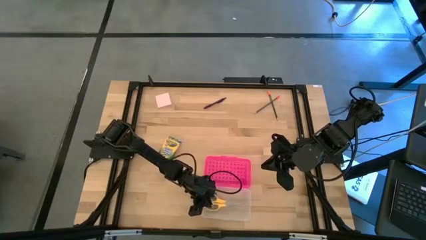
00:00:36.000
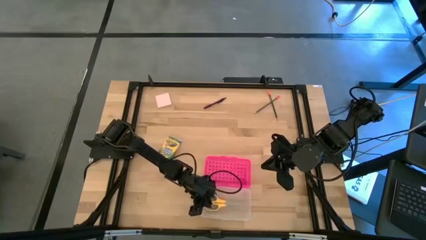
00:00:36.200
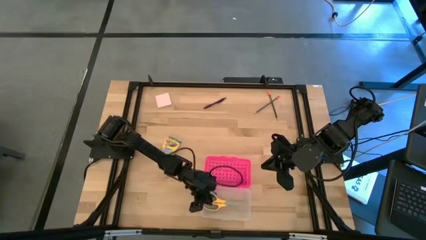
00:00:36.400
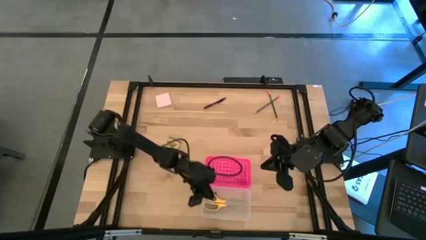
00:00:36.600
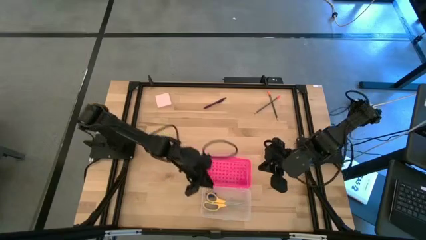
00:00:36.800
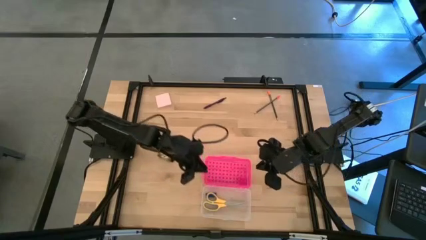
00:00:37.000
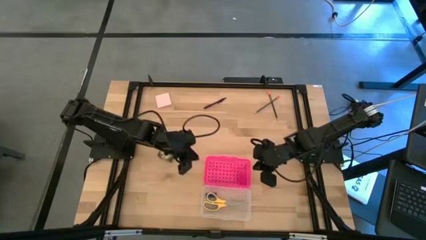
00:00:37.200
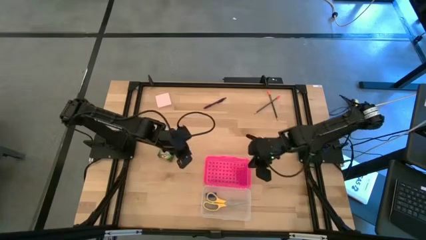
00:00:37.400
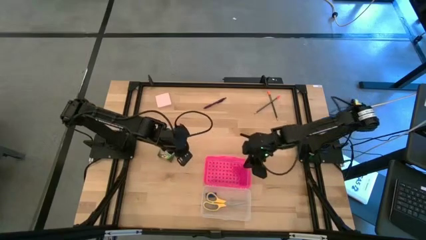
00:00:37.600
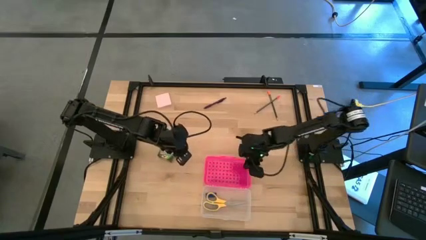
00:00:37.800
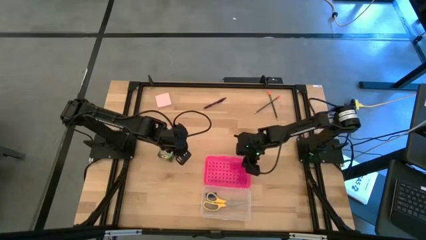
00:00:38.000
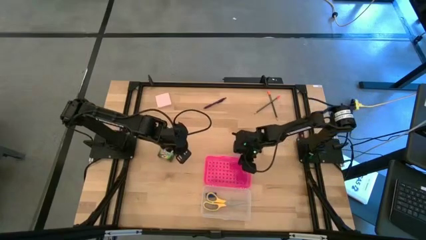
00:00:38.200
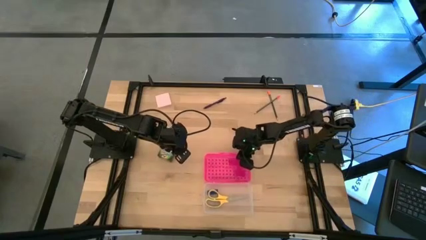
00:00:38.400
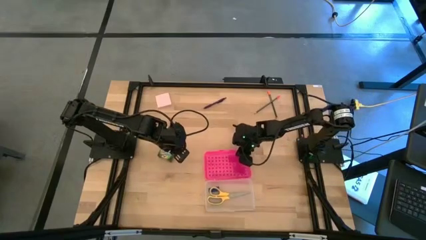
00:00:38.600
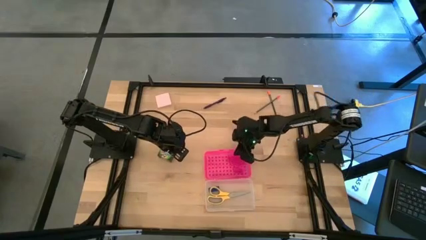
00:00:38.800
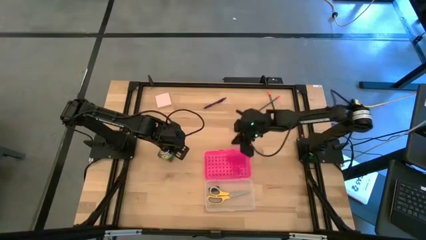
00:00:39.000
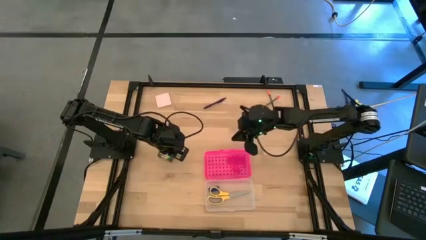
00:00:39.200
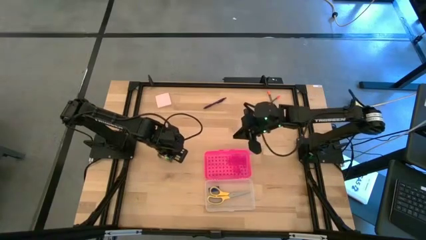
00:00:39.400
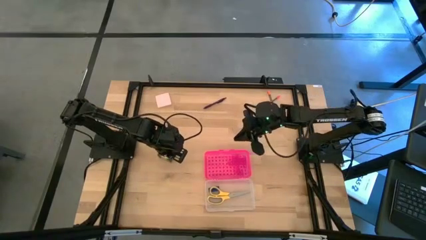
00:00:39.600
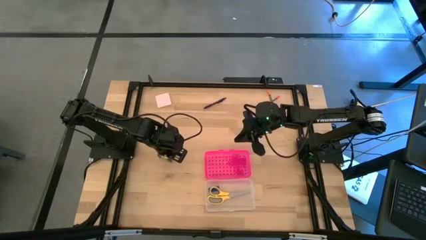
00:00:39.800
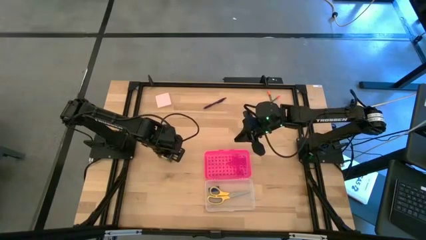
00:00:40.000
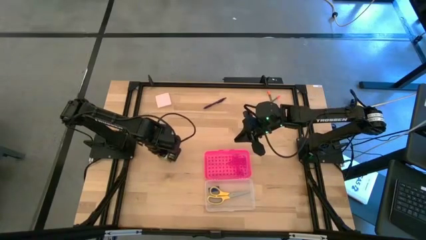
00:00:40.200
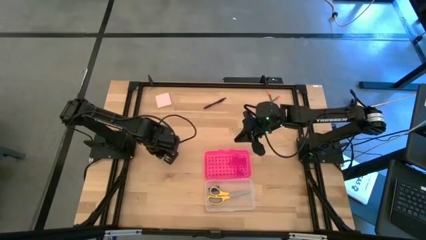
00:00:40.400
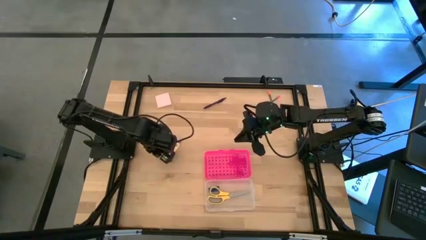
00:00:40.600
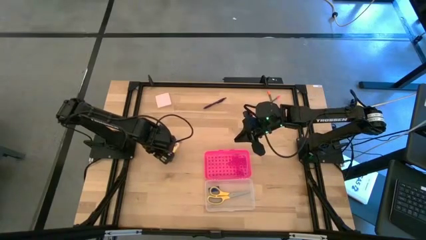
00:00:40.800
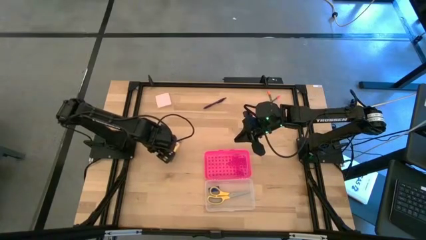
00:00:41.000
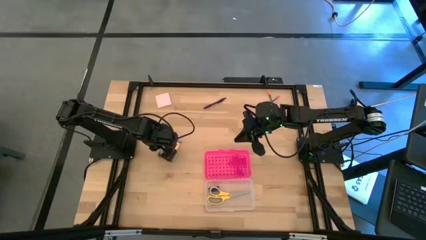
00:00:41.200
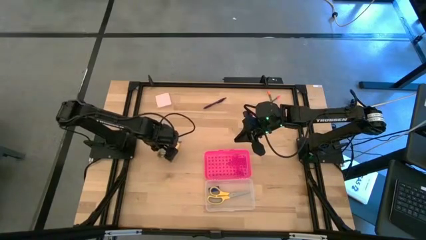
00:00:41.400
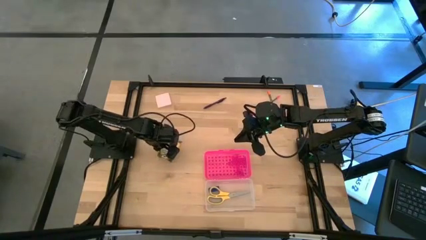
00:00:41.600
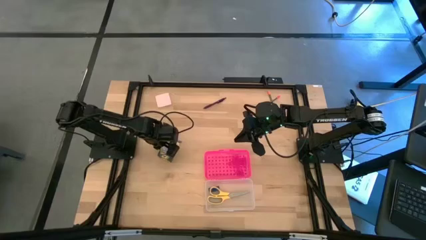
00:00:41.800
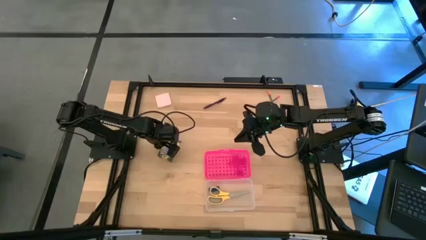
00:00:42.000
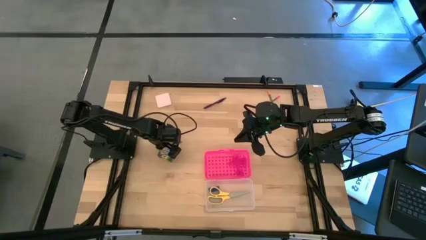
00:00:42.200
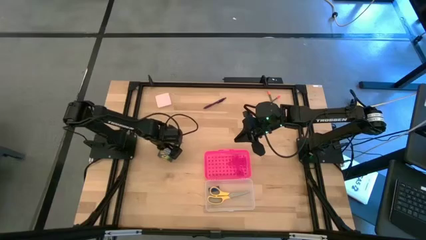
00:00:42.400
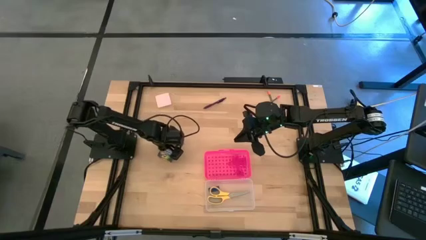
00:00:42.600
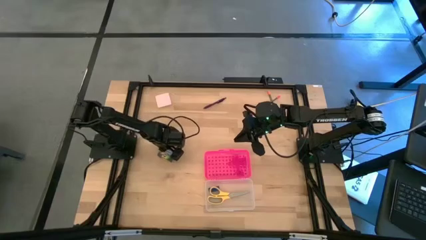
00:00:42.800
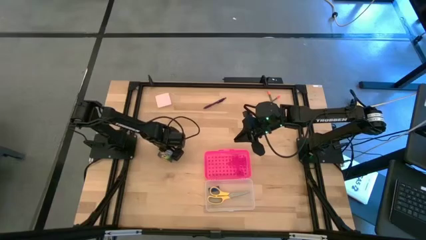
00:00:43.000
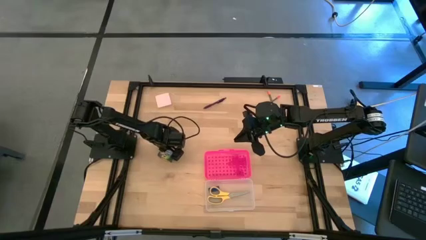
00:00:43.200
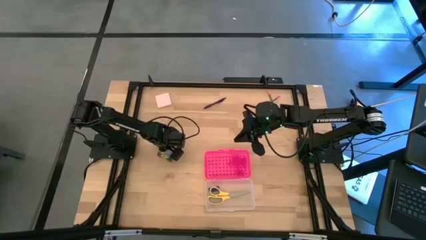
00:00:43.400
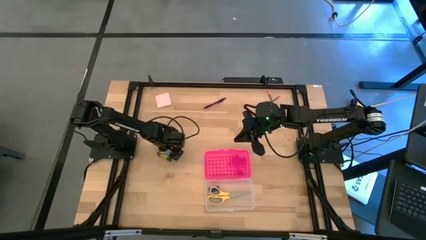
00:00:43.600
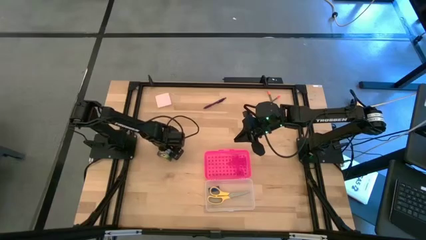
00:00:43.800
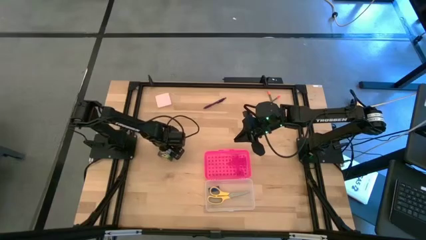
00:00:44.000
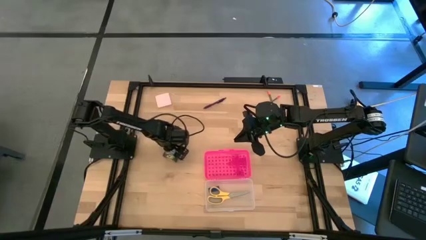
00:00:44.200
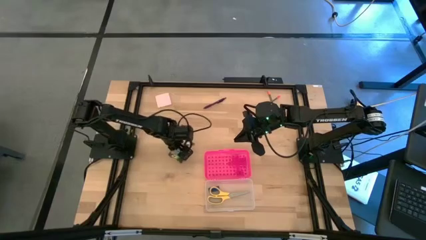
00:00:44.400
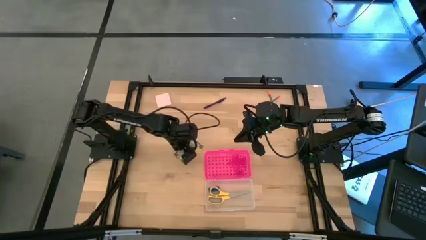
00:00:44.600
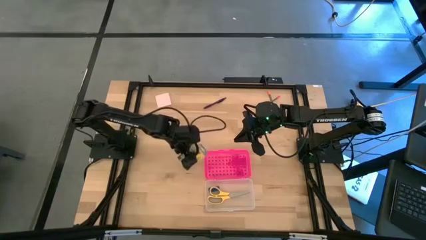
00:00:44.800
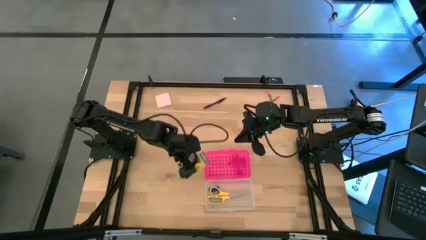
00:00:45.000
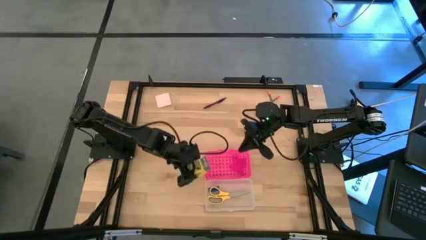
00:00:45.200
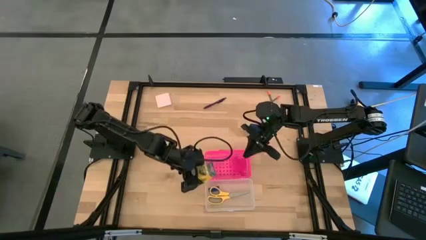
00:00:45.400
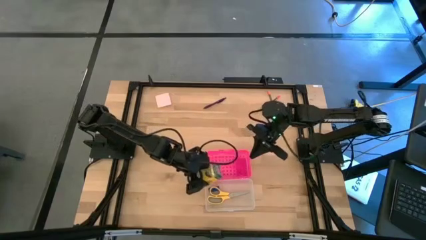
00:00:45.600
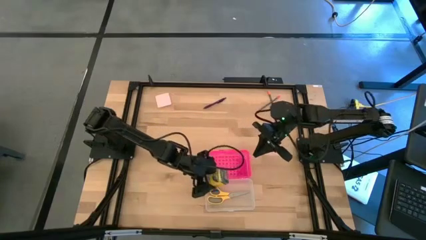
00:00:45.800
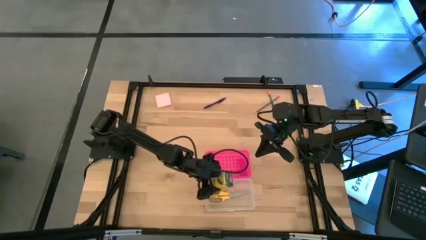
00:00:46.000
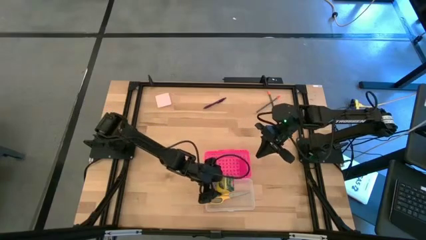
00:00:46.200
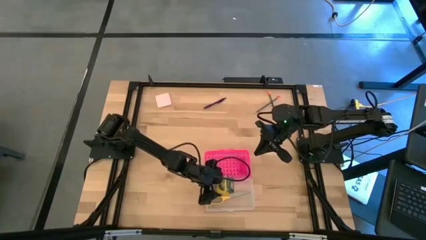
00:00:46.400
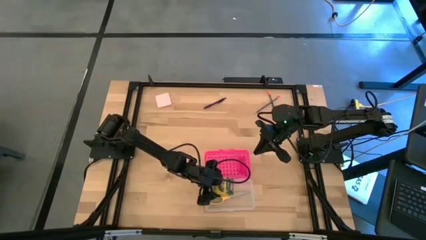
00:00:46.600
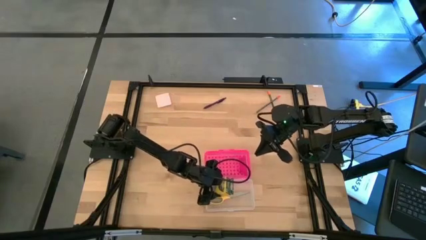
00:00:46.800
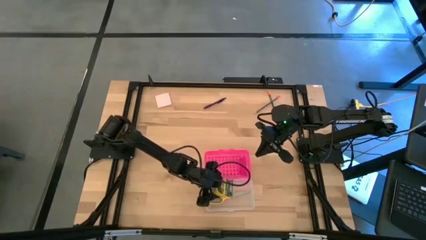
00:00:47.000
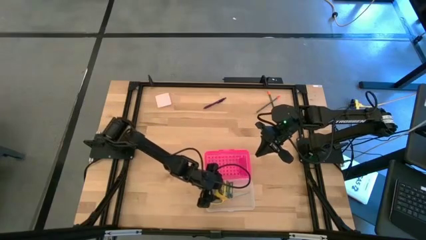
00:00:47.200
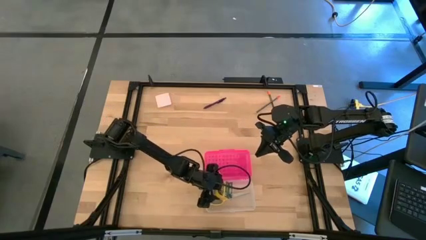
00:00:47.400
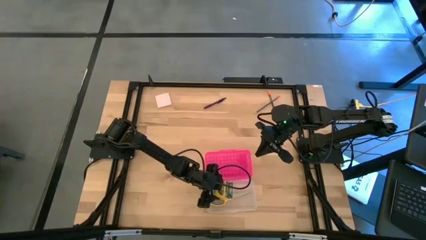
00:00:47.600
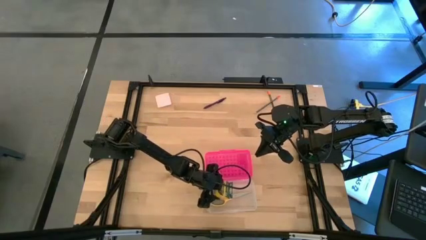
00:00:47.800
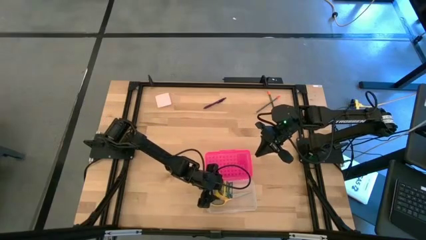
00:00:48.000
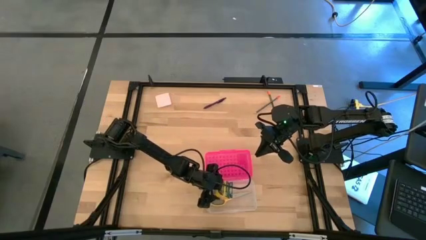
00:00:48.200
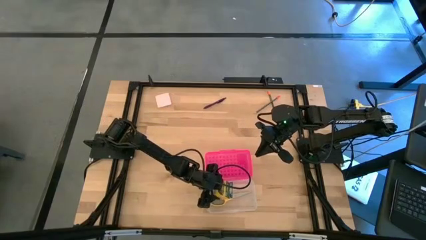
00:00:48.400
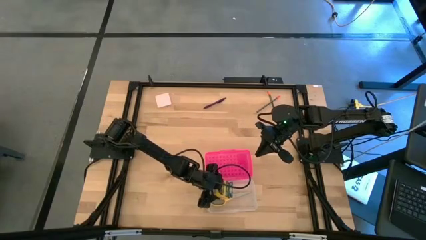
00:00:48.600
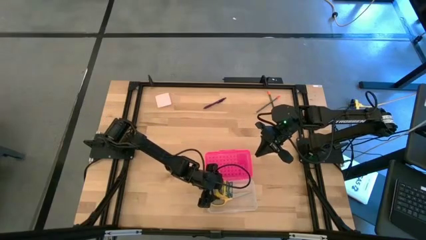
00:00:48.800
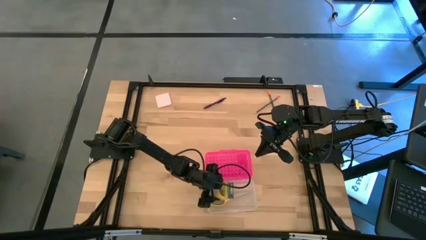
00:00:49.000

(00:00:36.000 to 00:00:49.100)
Task: Pack school essentials
Put the yellow crayon box into the pink box

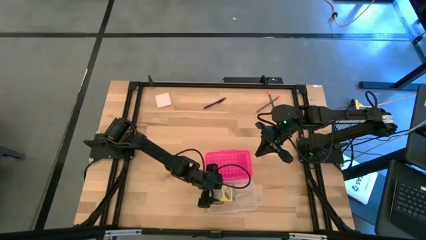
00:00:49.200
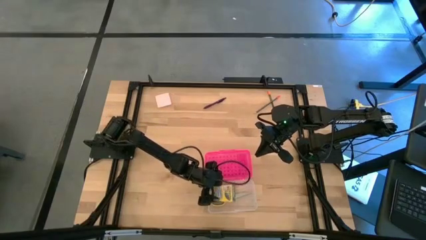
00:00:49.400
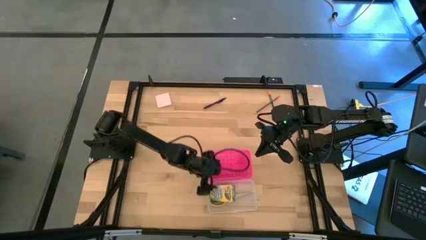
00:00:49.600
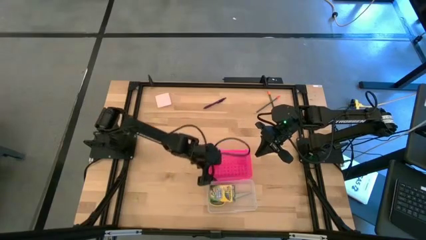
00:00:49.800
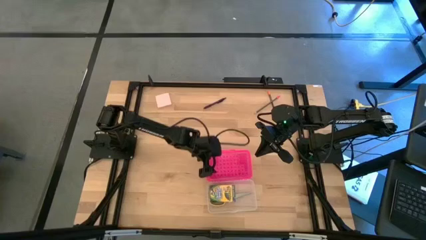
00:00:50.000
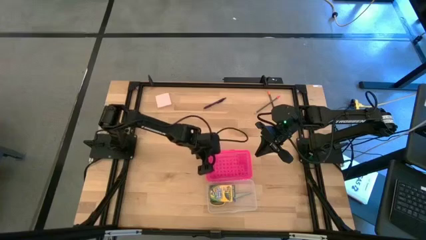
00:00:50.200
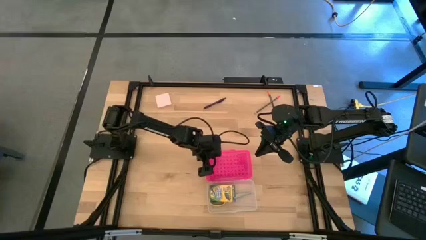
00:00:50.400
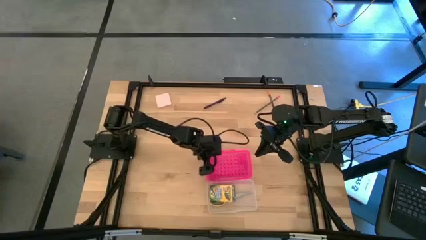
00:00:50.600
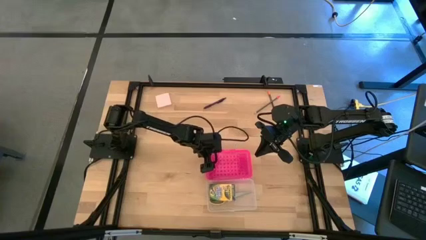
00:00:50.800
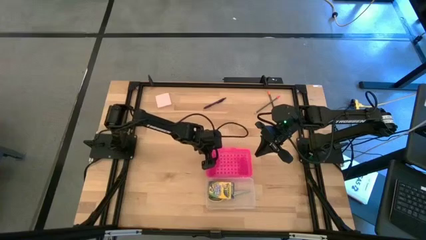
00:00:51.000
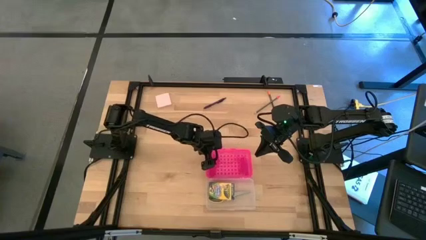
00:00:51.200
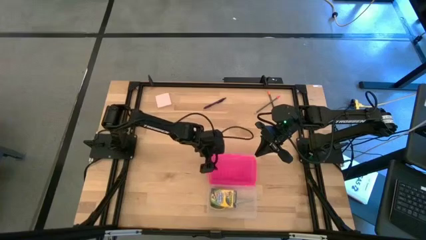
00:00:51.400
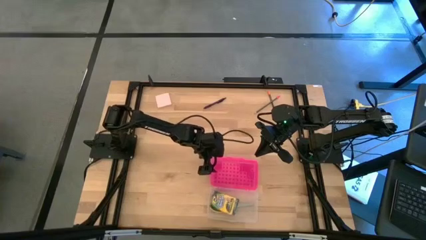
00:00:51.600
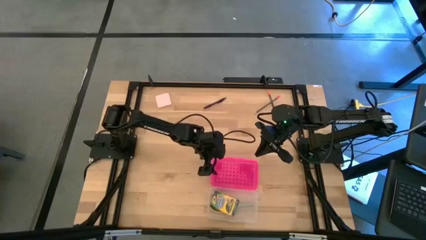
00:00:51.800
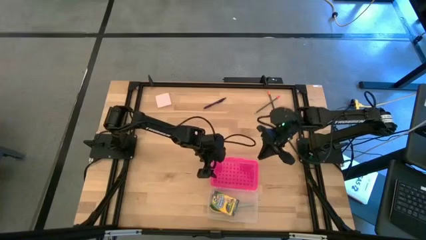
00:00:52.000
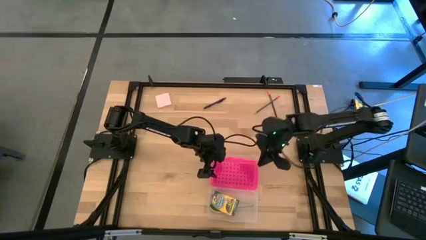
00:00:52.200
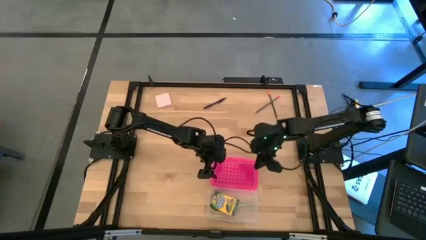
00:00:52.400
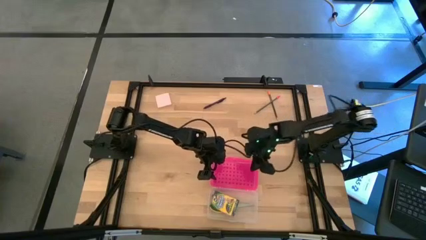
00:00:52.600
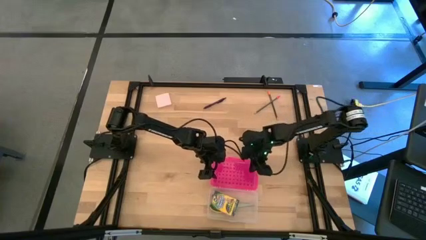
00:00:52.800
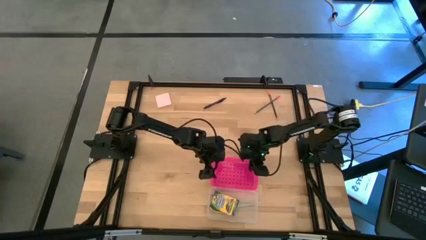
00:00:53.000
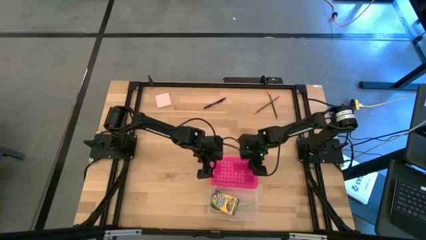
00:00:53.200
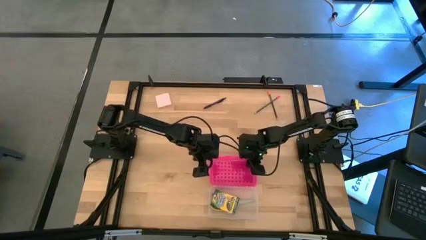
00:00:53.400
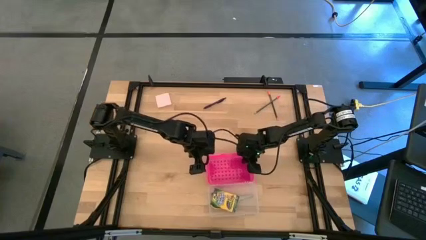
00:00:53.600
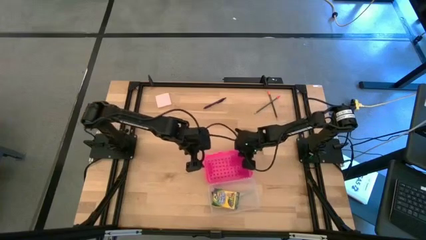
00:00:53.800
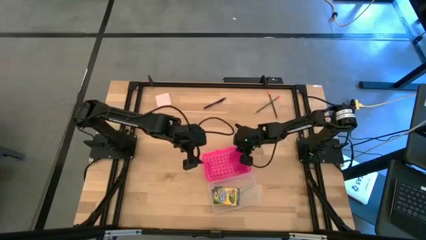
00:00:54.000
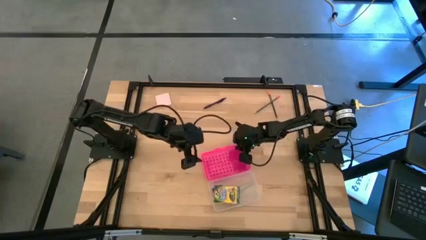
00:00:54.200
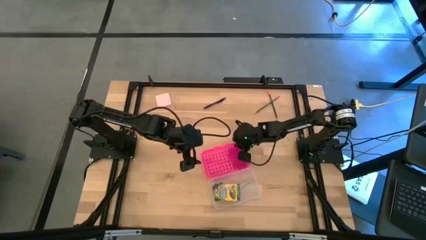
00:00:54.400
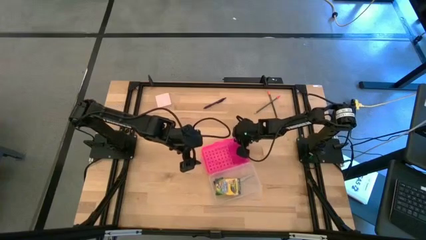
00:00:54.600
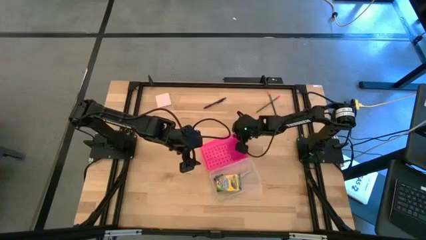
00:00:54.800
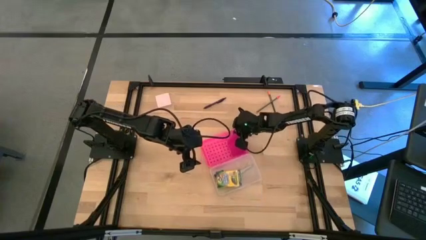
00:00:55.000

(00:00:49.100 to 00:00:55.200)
Adjust the pink box
